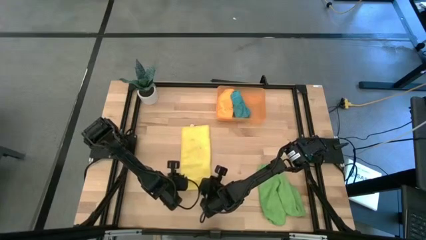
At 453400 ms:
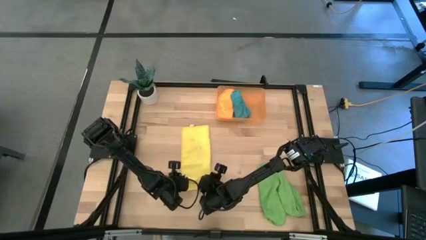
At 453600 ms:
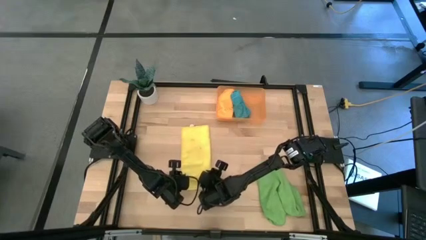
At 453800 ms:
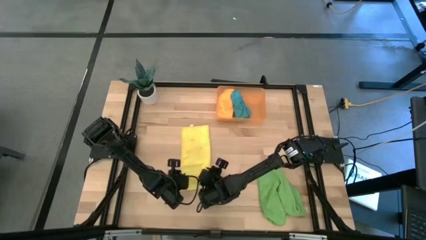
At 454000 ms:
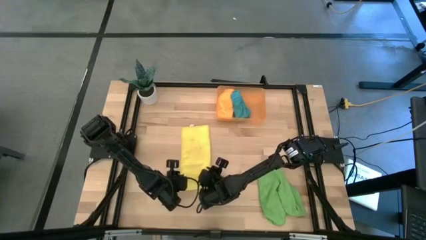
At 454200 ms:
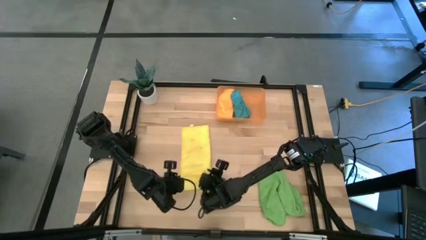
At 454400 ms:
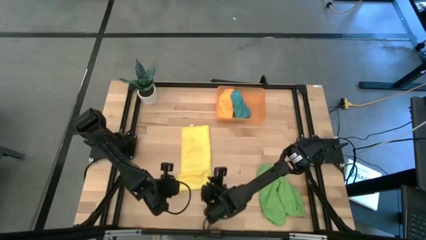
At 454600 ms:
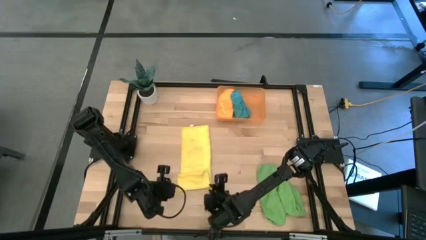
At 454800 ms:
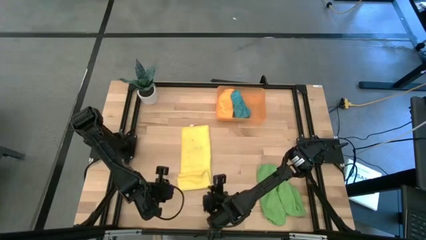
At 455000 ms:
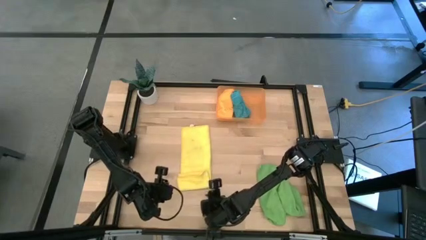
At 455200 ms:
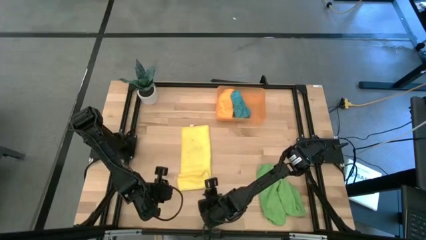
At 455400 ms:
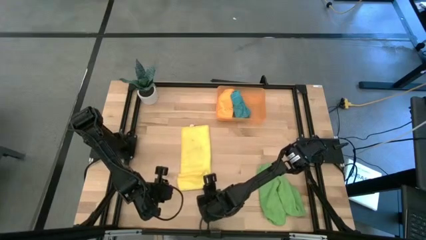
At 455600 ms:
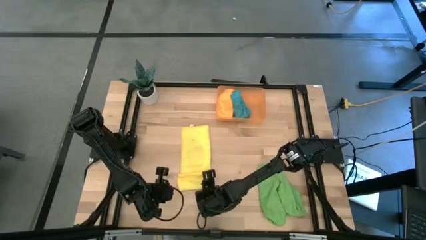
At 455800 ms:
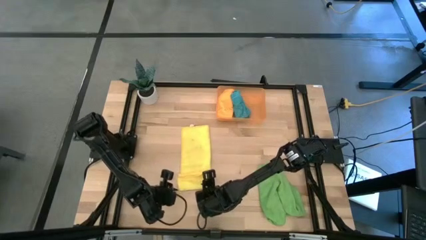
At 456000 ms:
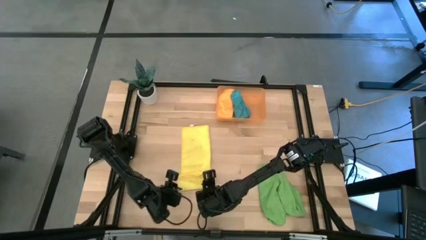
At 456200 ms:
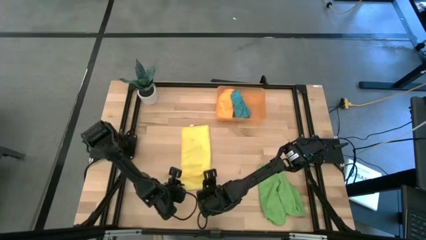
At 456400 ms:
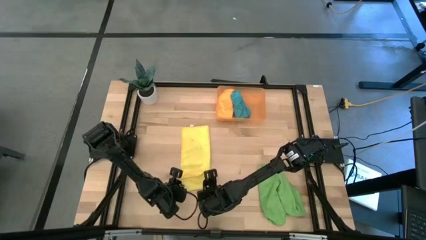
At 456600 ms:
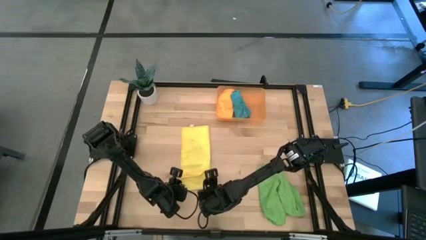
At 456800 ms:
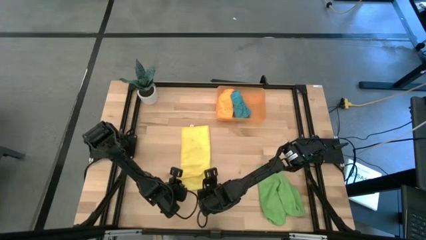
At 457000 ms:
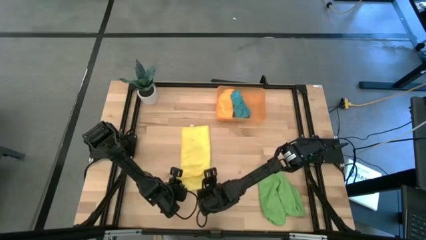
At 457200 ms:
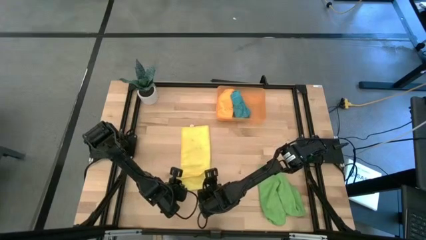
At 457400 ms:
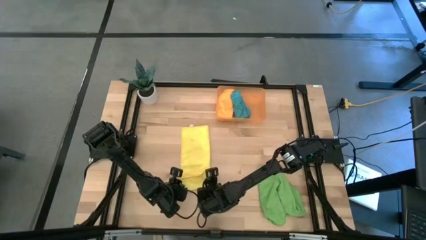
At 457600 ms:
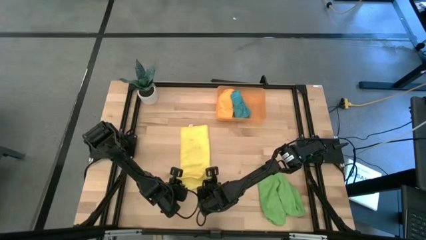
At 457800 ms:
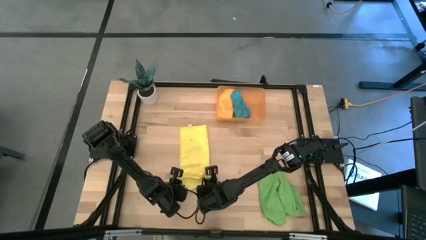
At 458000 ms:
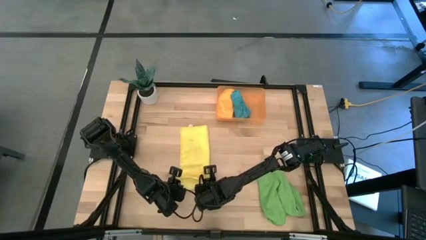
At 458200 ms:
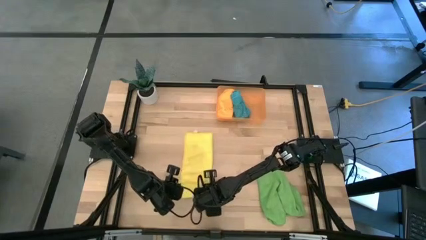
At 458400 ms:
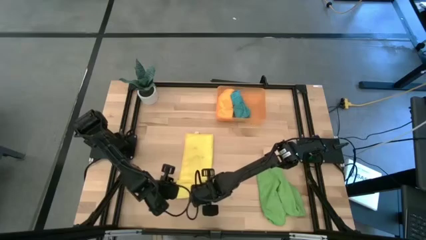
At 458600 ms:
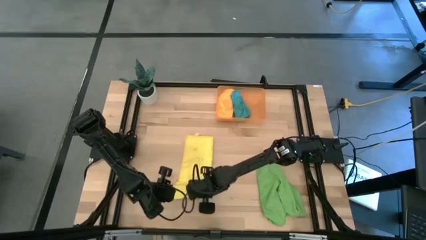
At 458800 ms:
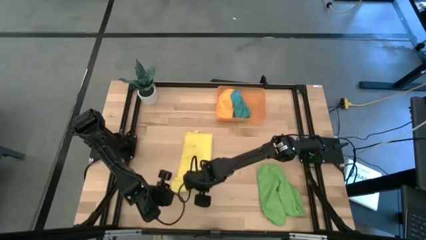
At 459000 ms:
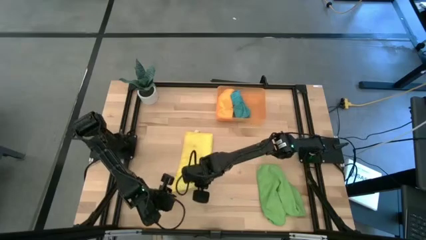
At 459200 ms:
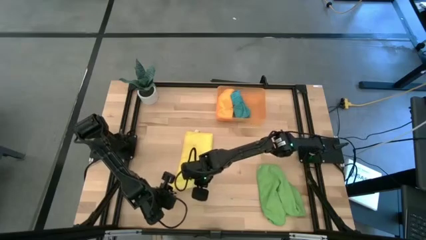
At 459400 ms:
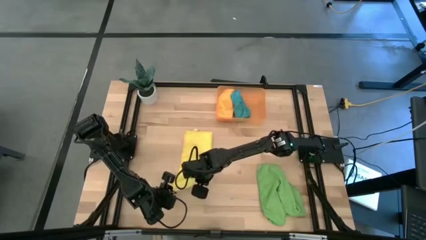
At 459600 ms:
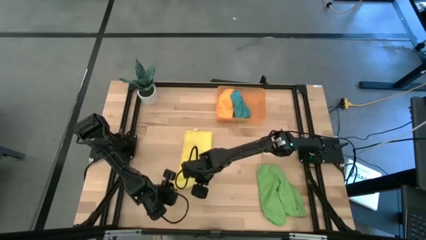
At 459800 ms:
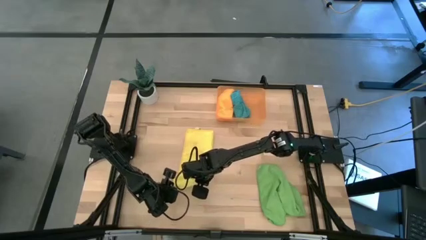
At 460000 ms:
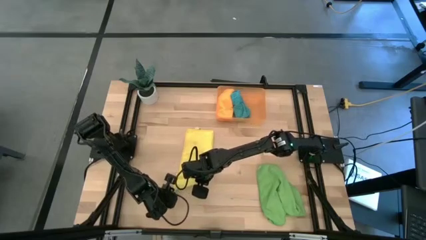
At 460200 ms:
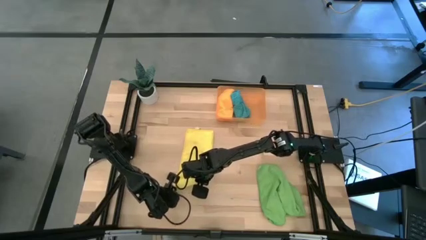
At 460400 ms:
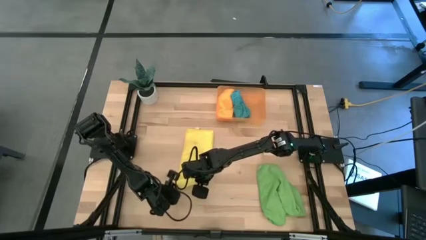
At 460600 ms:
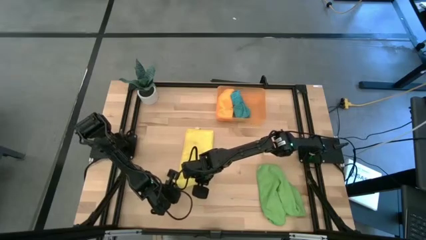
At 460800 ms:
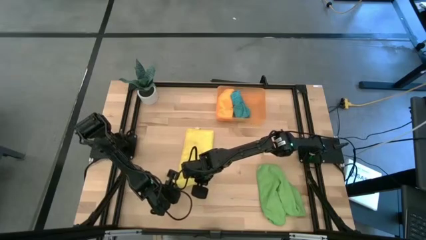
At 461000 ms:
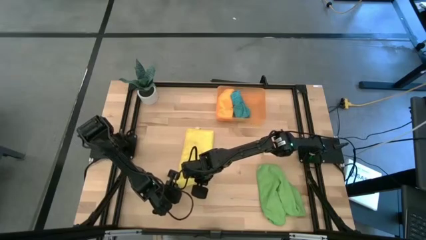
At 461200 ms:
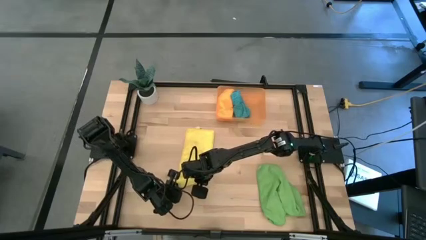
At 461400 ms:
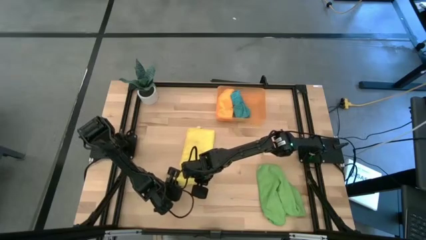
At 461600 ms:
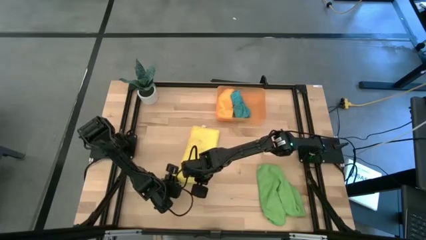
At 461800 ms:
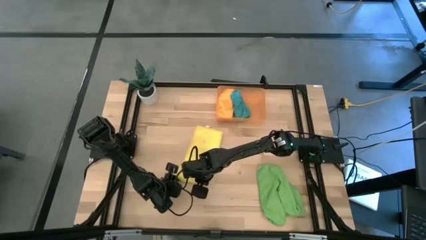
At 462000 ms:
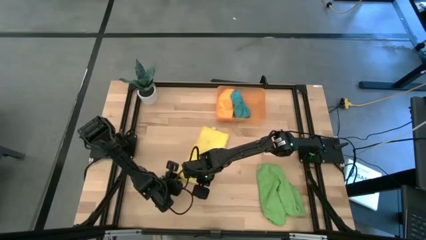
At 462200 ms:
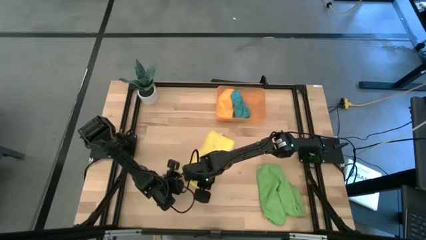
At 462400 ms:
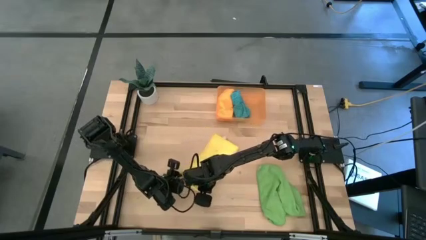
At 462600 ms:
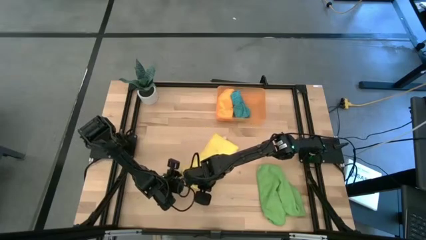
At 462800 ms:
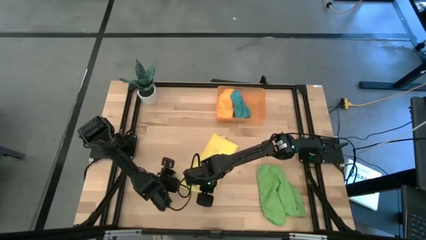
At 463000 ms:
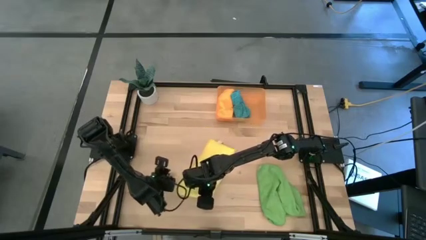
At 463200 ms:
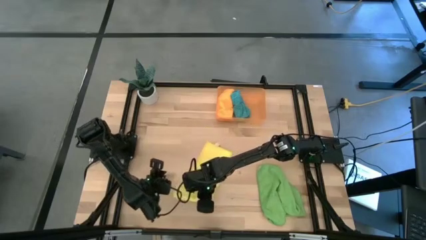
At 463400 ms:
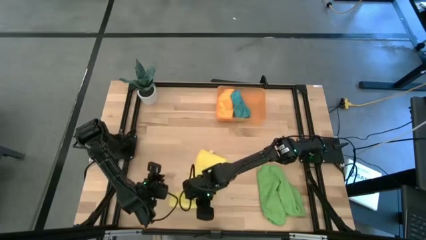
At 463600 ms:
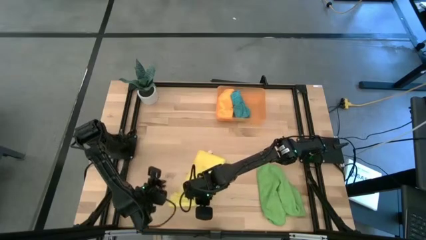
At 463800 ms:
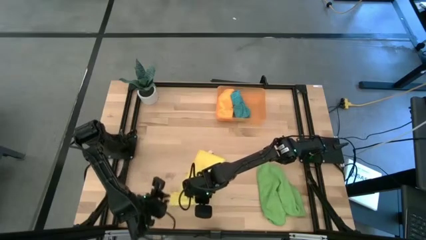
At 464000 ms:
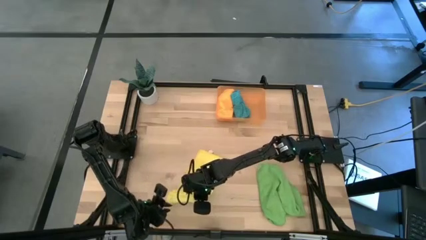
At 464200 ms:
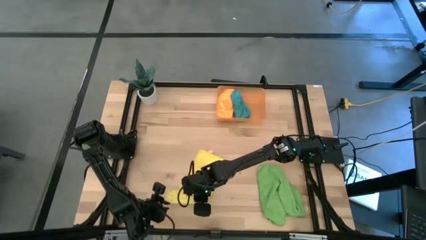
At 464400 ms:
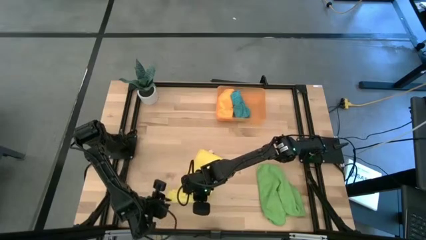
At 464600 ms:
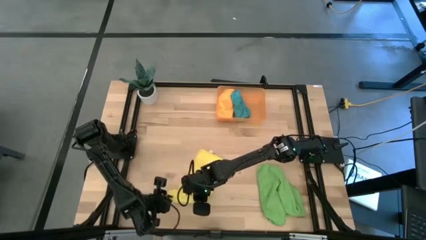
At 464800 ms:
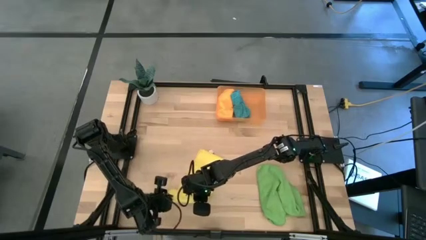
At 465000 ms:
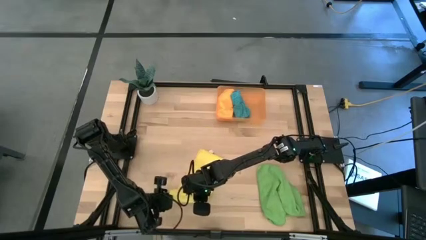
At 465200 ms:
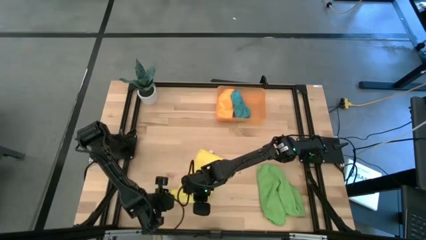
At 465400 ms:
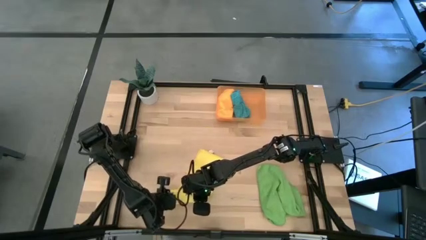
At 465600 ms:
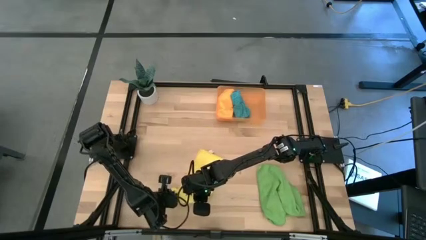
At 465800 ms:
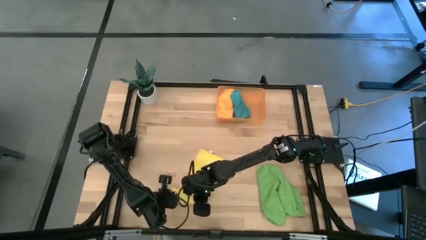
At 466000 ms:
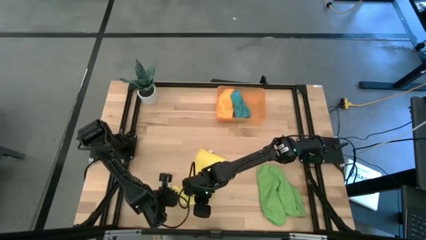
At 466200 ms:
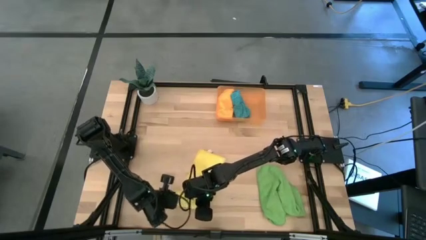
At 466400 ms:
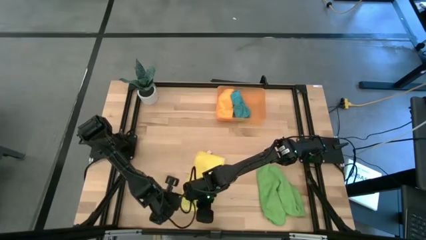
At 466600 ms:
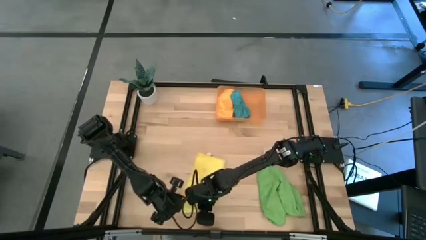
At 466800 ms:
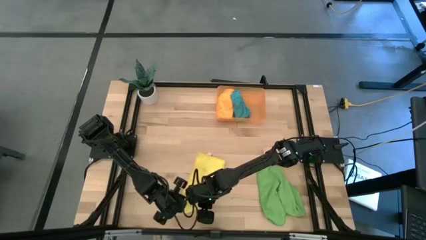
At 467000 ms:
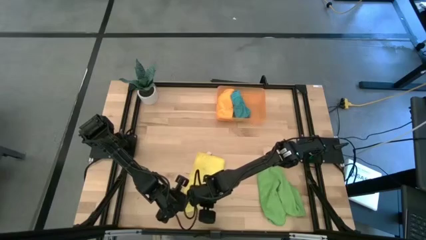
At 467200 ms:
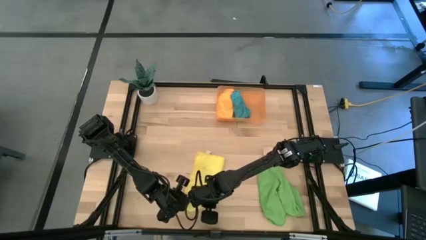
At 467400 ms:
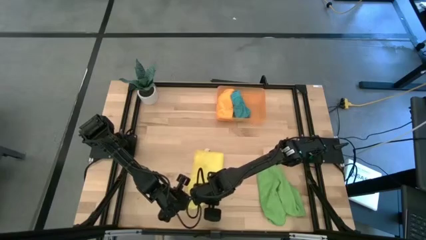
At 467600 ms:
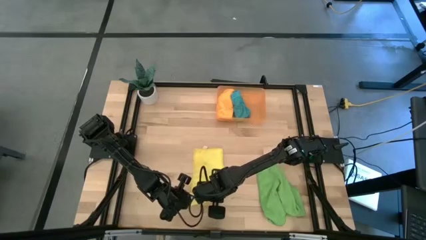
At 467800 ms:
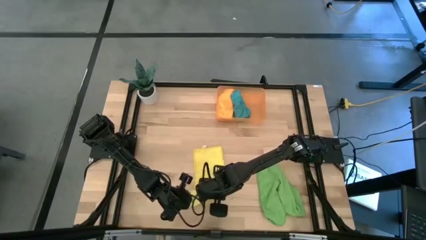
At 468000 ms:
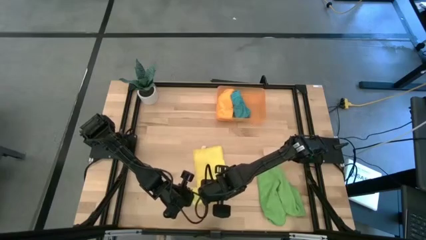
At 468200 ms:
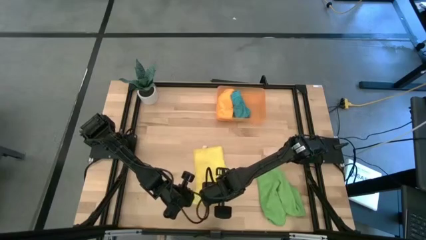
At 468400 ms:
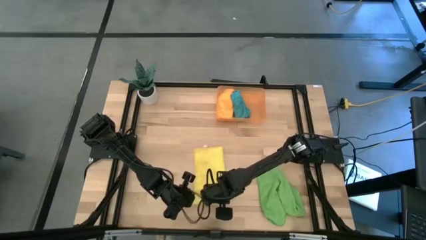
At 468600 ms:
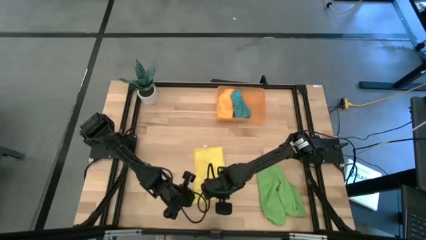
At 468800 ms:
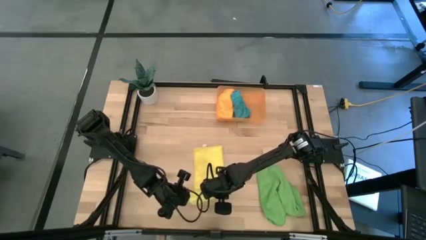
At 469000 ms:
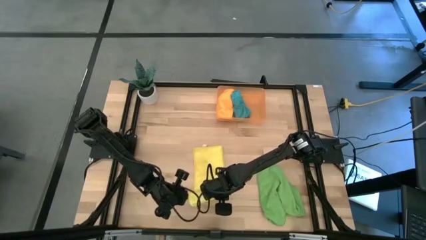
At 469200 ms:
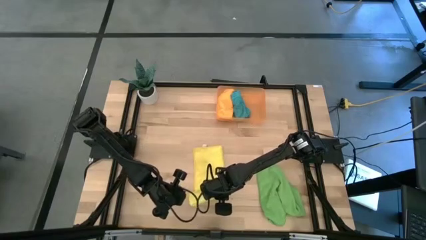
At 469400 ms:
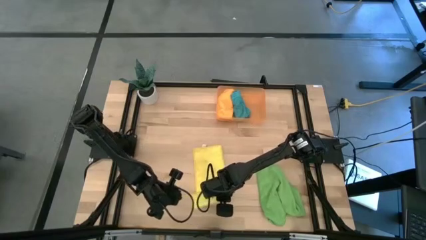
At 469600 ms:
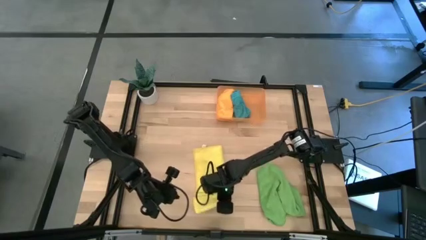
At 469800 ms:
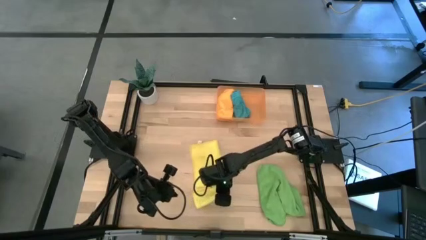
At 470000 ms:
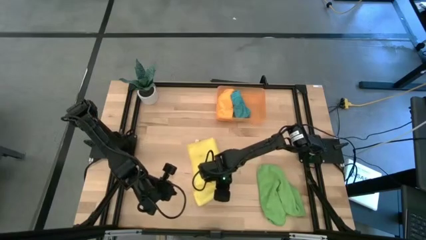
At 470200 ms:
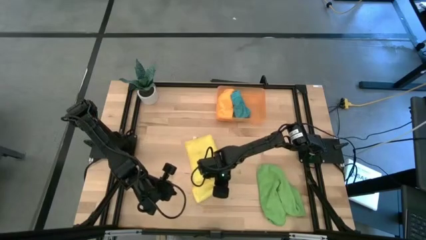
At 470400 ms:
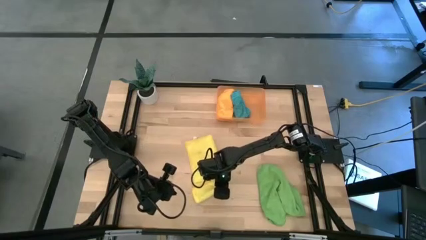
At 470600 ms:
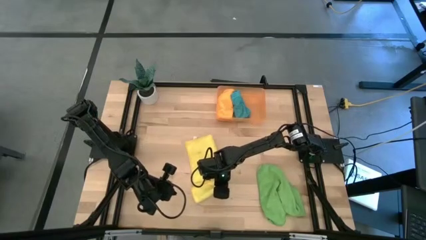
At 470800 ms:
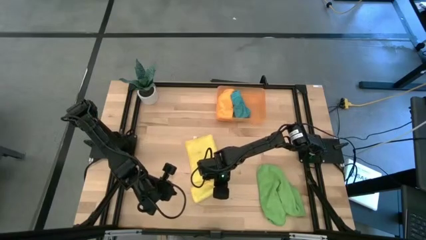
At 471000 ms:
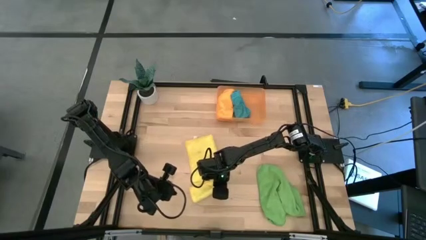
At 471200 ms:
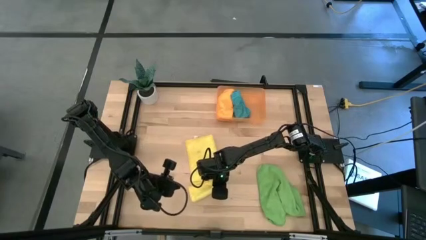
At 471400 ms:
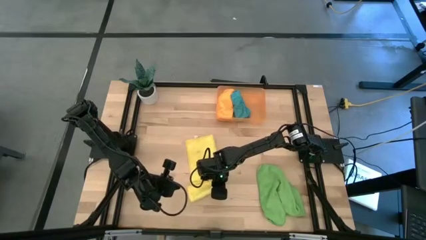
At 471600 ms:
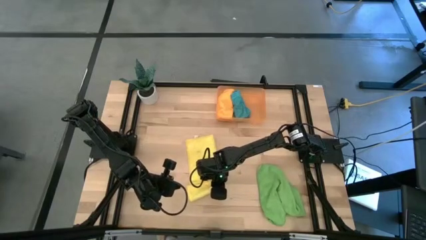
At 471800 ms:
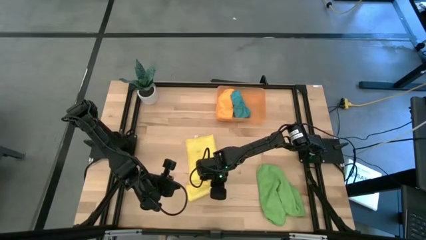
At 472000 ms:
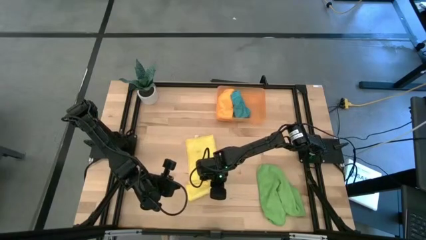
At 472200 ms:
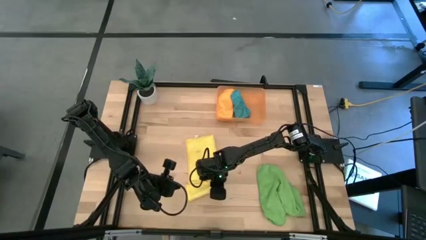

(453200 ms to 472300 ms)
Task: Roll microfiber towels into tight, uniform cylinder then place into a basket
Roll the yellow microfiber towel
